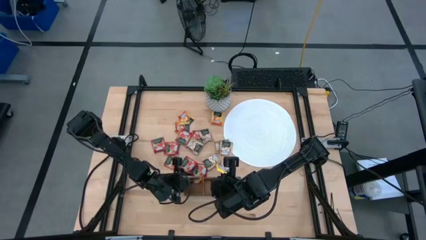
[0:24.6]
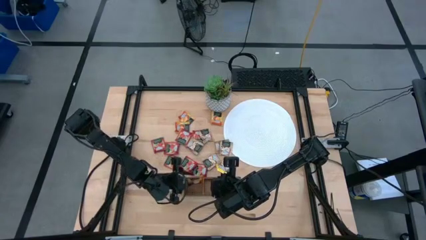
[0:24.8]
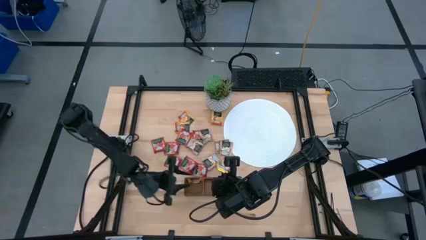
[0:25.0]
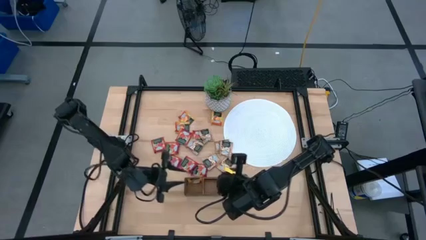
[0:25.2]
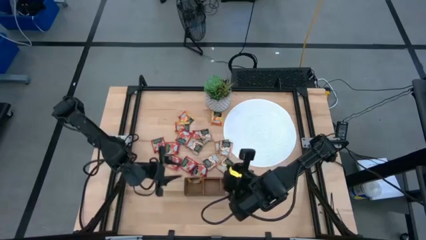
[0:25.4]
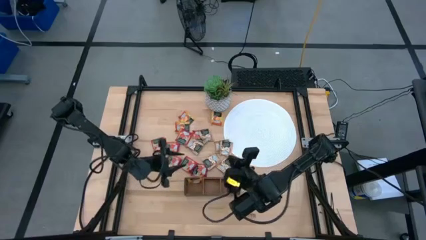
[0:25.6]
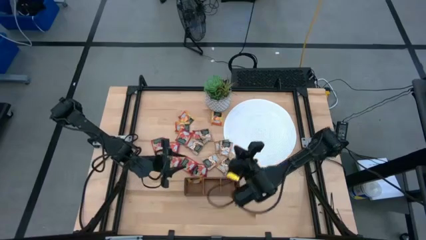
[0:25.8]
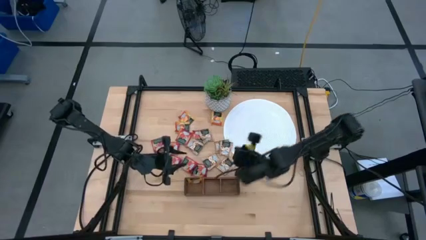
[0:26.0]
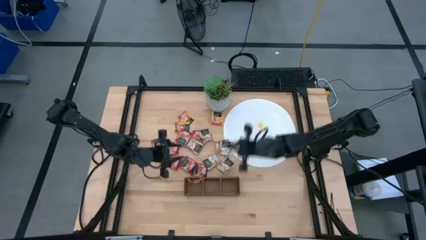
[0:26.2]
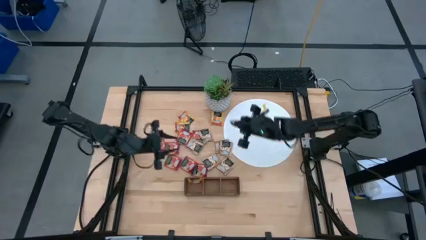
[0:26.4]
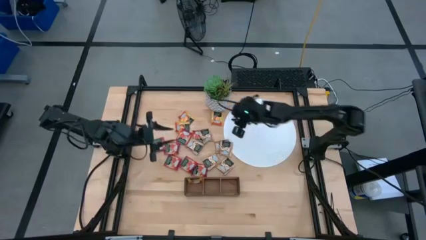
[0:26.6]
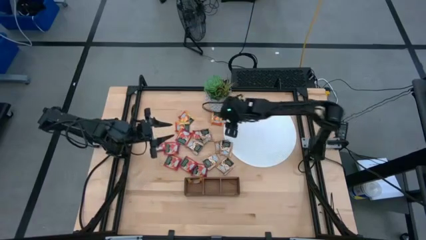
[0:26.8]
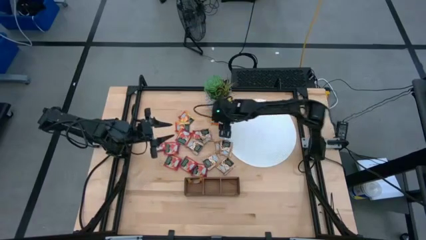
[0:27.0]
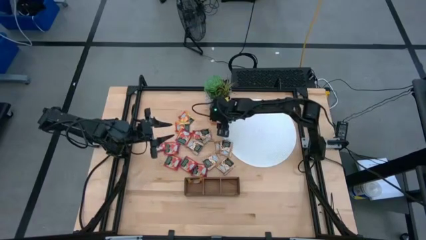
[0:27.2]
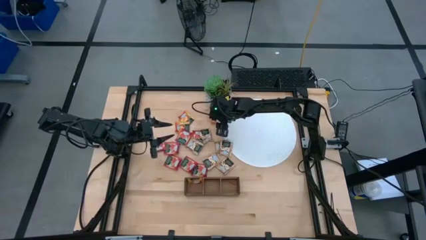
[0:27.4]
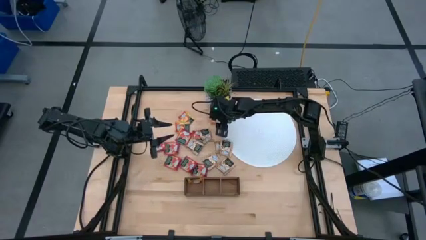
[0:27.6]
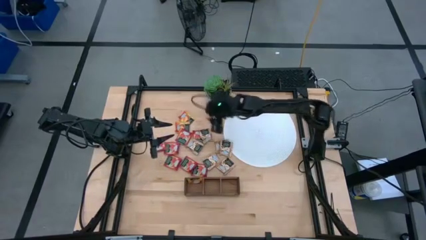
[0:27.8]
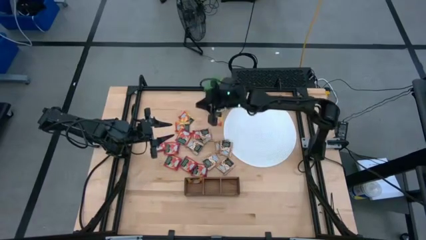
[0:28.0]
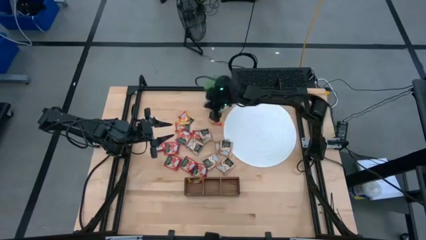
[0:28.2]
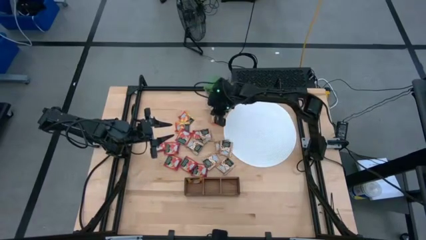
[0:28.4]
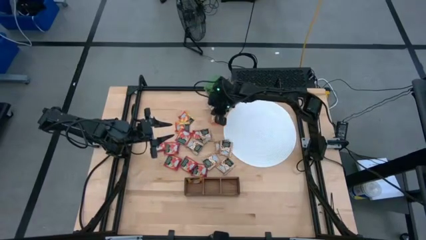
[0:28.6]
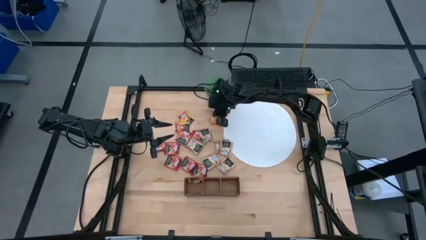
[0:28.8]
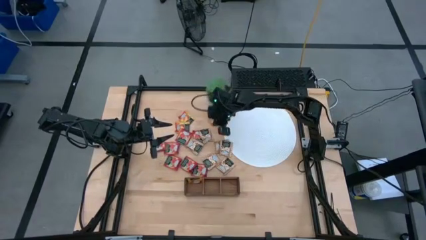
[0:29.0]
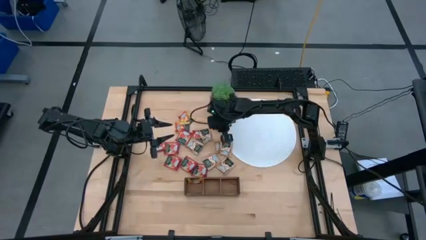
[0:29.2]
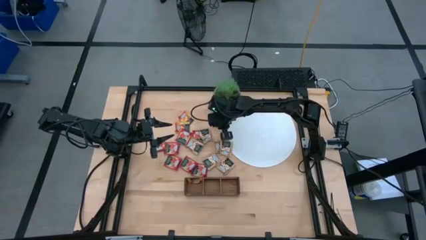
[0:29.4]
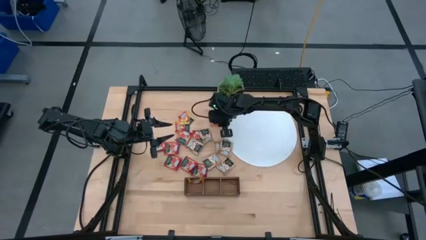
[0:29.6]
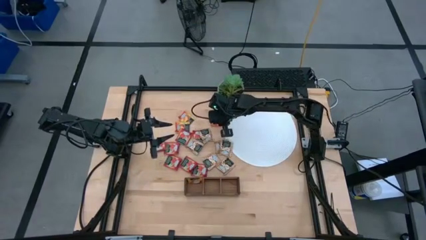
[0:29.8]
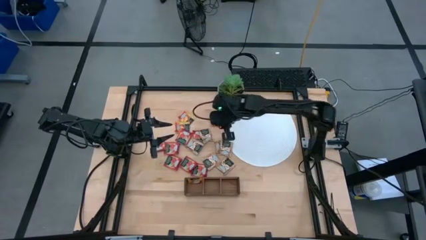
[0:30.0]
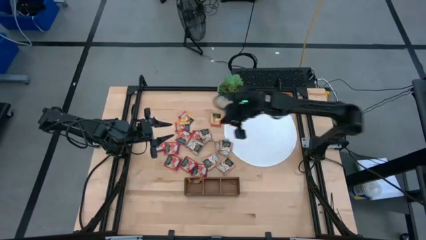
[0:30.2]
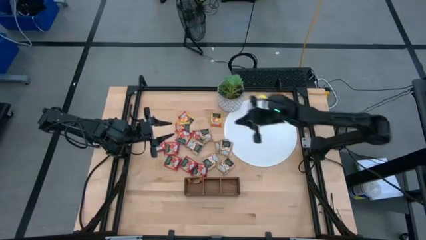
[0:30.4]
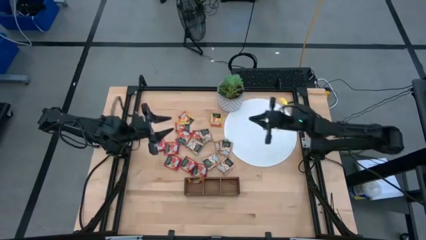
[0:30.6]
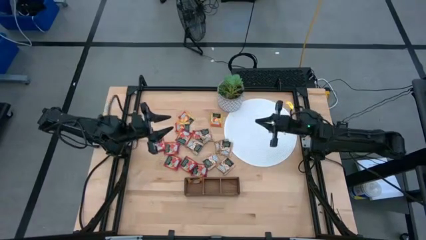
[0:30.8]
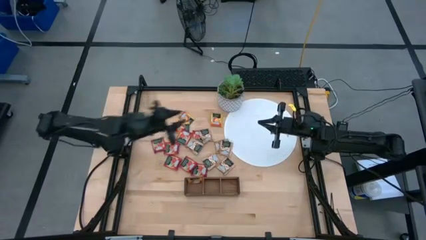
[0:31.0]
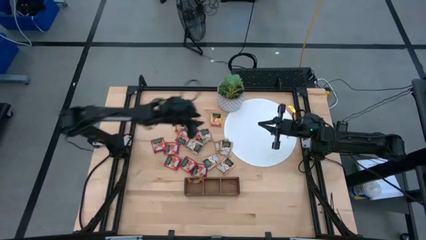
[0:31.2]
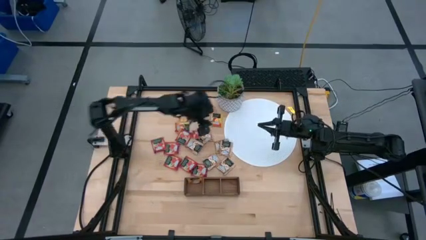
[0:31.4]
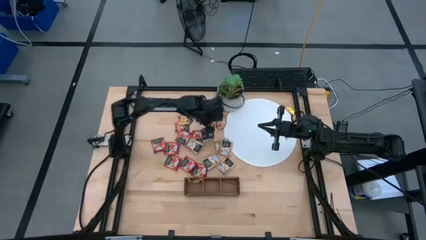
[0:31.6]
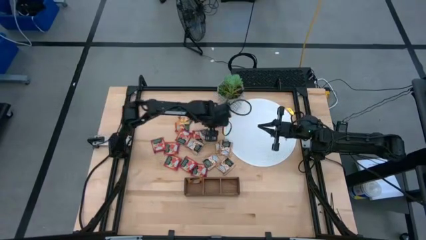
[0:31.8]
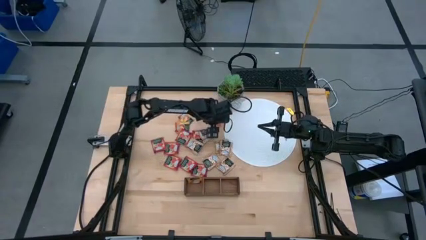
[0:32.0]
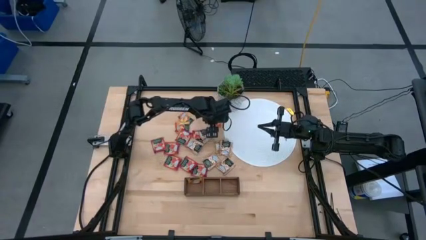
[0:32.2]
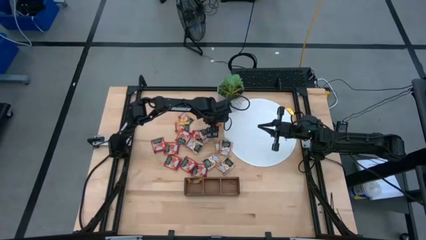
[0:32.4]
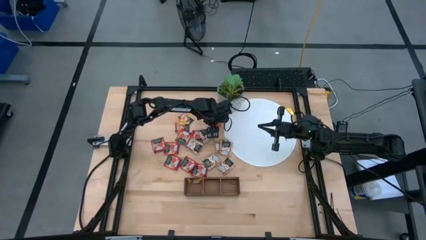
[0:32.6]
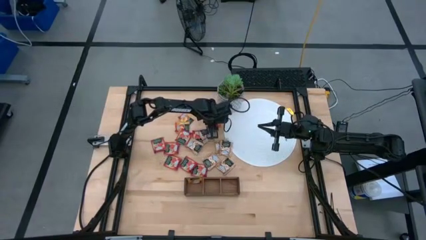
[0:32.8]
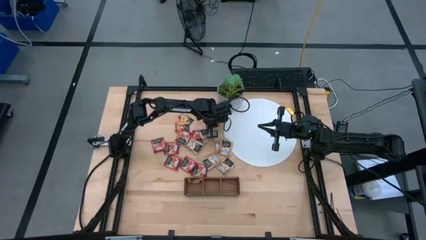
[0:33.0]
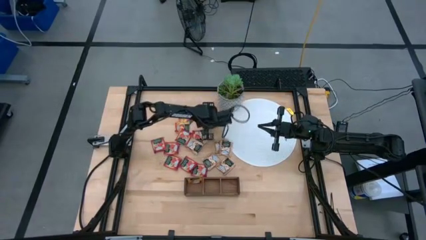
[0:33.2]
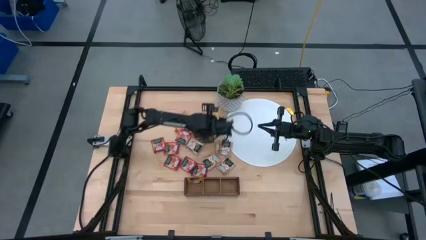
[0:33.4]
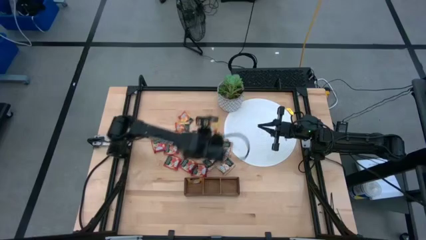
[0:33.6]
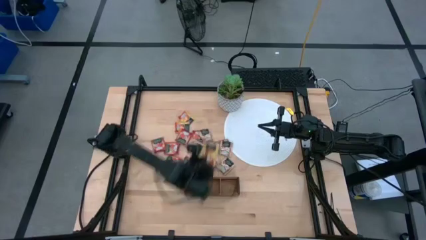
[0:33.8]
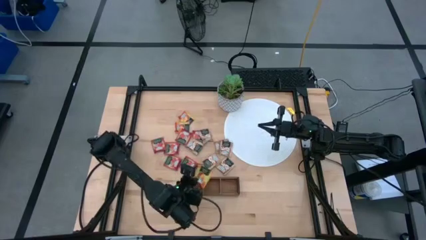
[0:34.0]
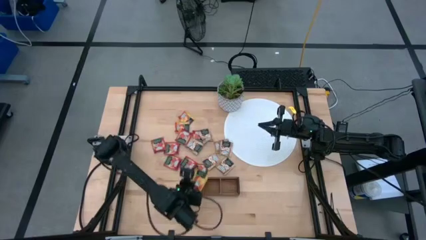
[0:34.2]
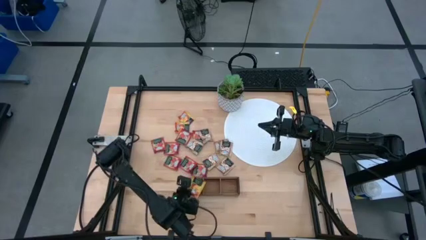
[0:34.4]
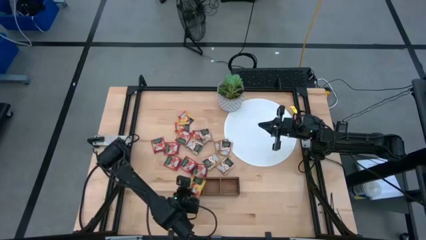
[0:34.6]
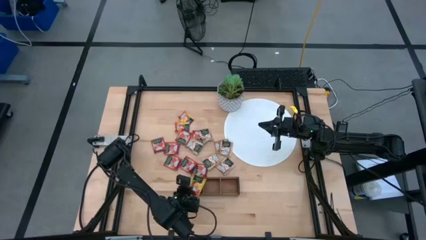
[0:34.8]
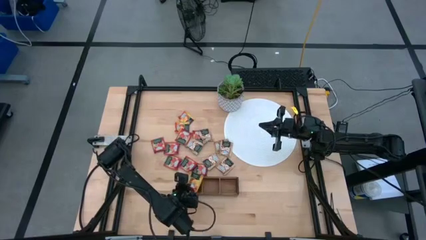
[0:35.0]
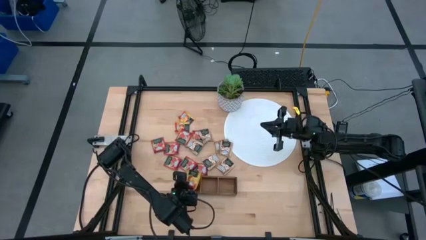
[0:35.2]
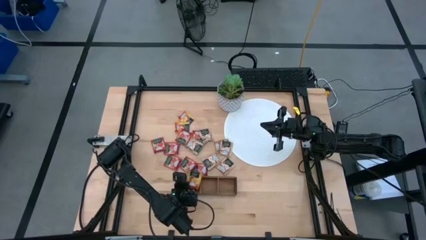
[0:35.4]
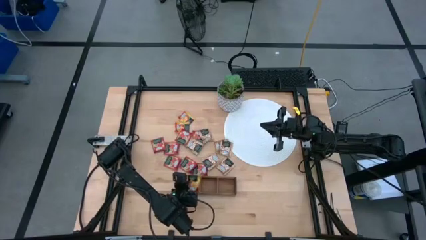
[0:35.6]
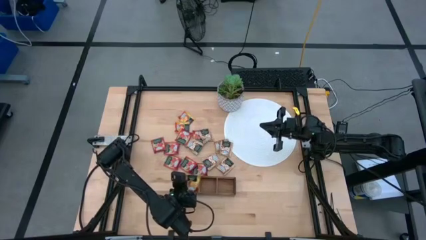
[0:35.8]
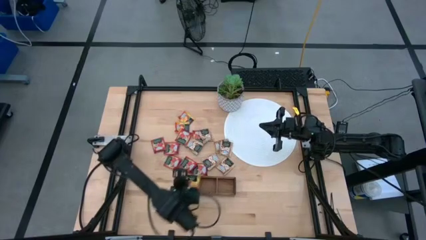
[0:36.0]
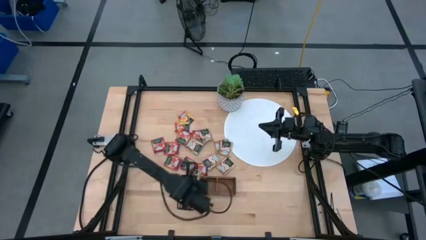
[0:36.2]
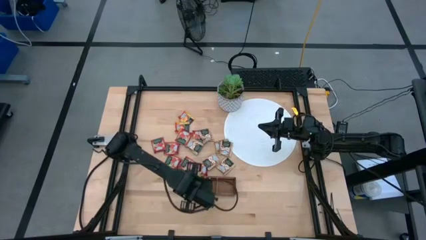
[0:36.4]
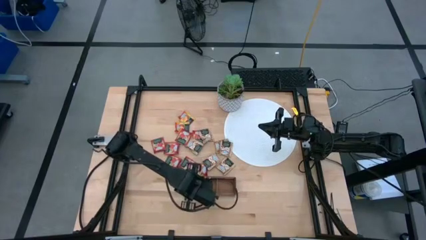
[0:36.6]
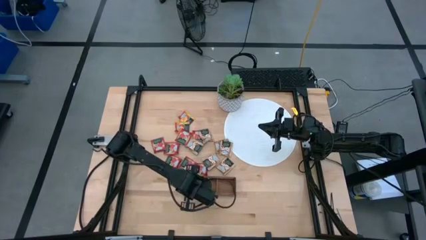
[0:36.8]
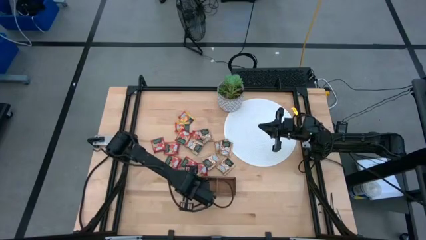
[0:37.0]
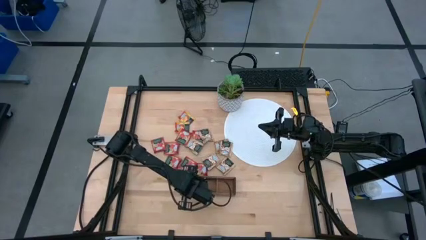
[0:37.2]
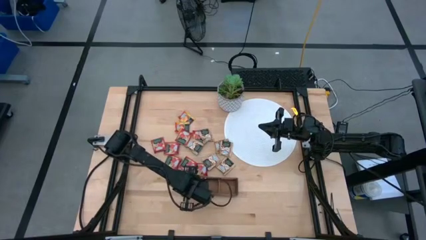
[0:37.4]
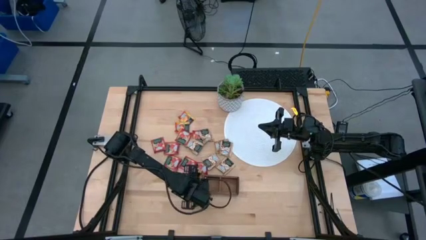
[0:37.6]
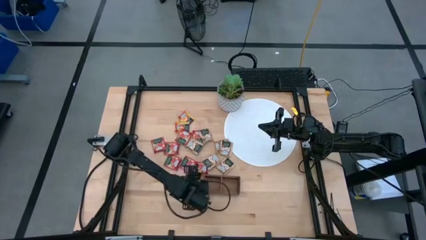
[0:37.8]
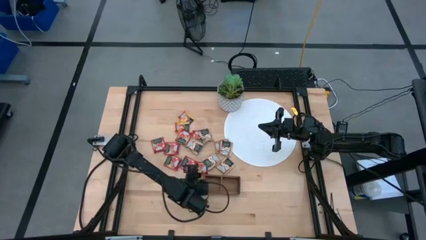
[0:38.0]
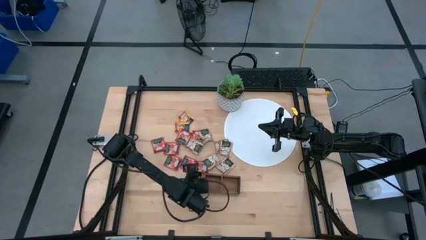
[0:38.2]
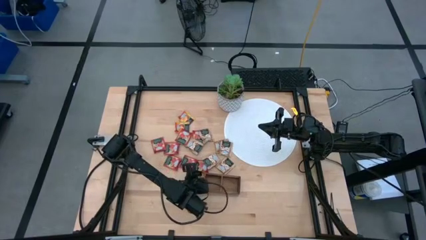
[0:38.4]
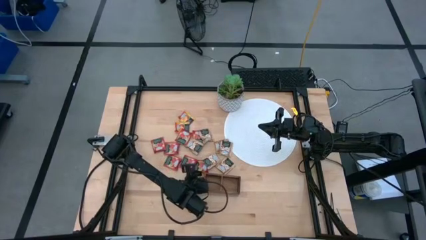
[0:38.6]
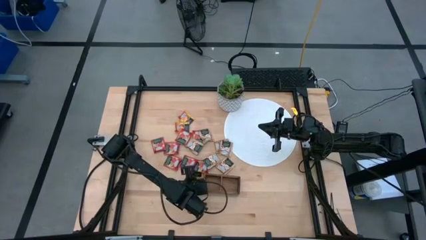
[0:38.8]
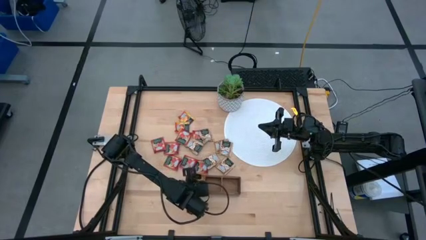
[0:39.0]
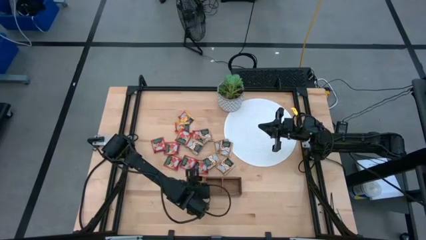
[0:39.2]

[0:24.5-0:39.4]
Task: Pick & Place Tea
Put the orange tea bag into the left section of the wooden organizer

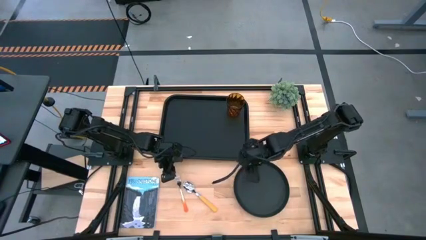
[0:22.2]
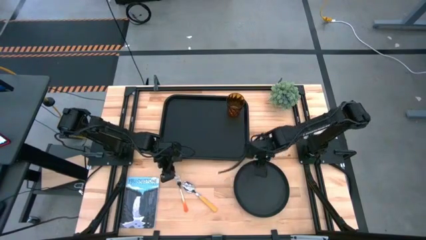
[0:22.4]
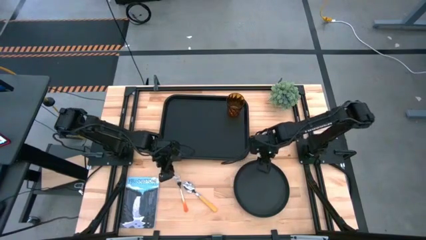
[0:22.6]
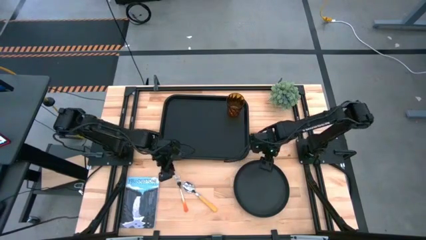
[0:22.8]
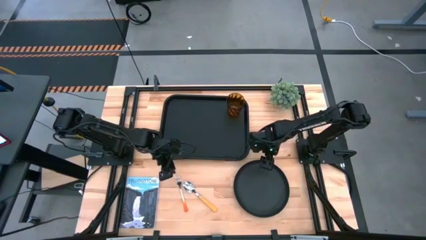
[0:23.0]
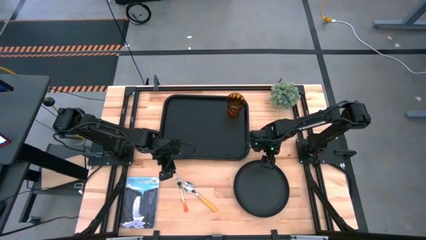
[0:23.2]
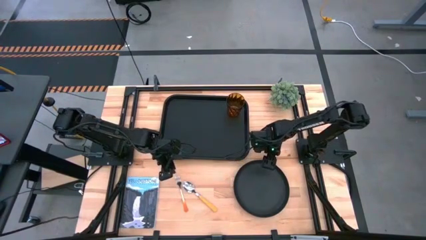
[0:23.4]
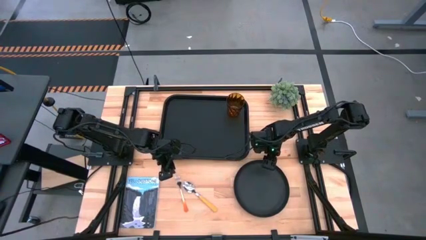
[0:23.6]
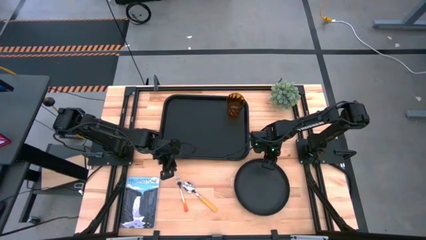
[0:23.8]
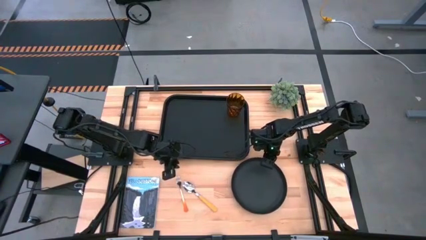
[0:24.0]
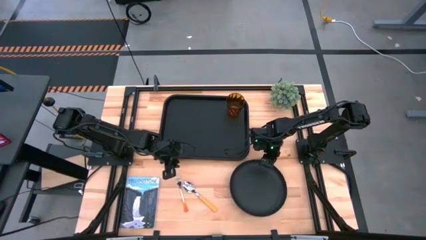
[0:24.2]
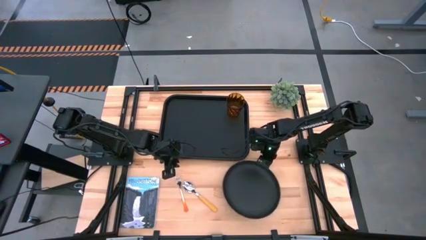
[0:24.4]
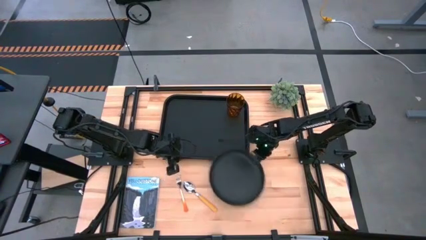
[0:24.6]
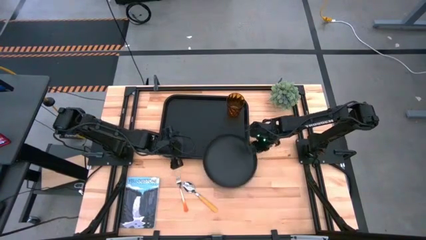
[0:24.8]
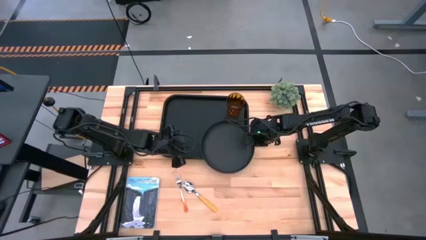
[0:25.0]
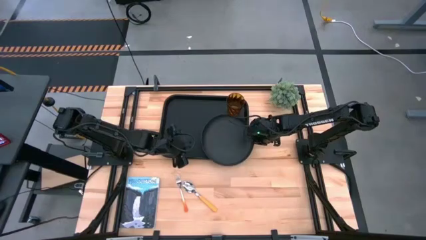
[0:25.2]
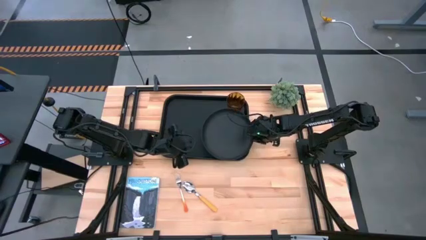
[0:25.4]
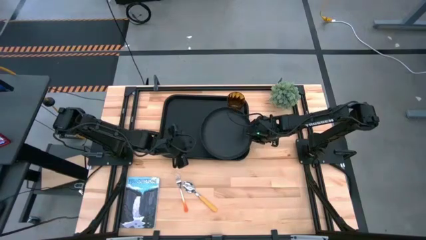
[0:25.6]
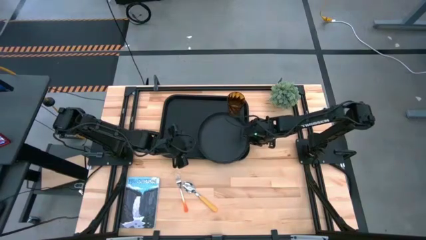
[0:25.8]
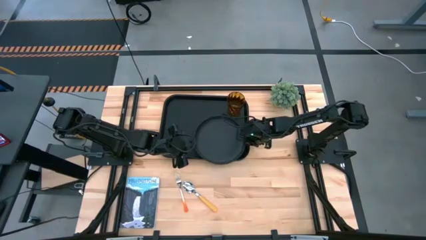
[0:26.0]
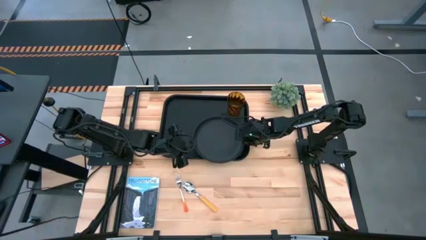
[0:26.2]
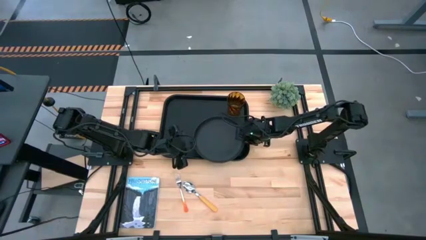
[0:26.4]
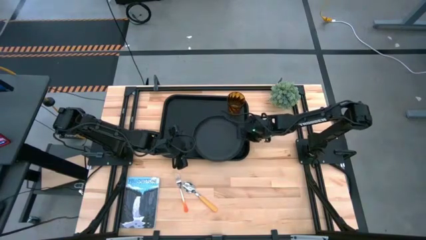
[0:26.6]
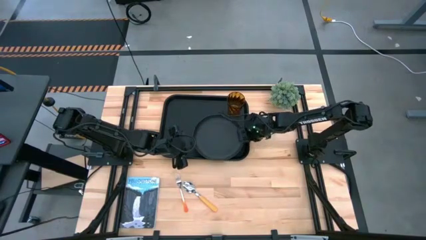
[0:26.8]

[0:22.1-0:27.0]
Task: Pick and place plate/cup/fork/spoon on tray
Put the black plate on the black serving tray
